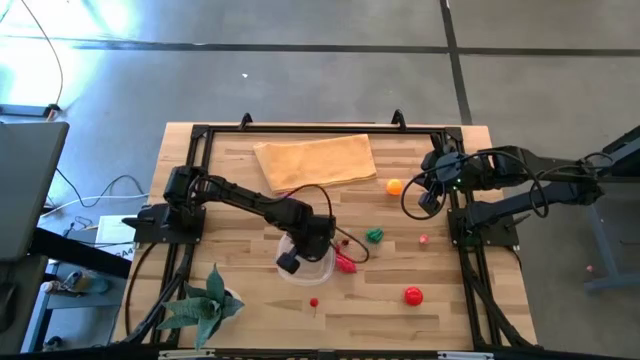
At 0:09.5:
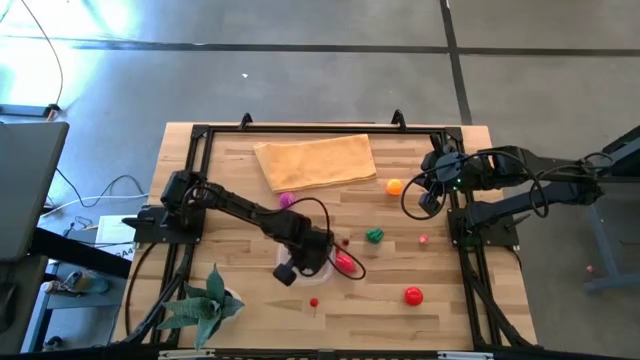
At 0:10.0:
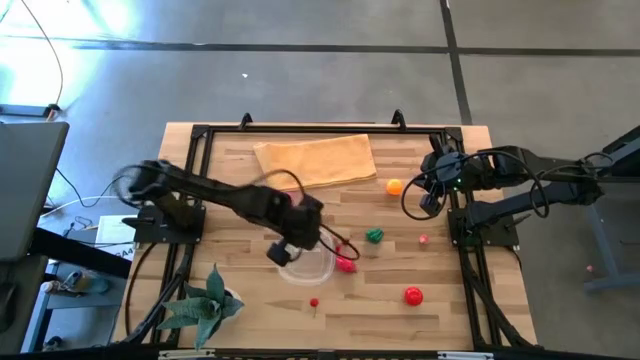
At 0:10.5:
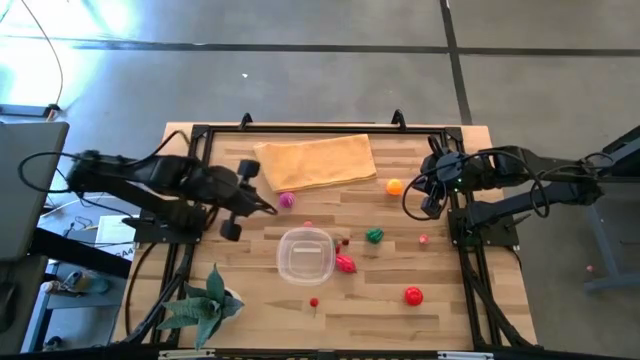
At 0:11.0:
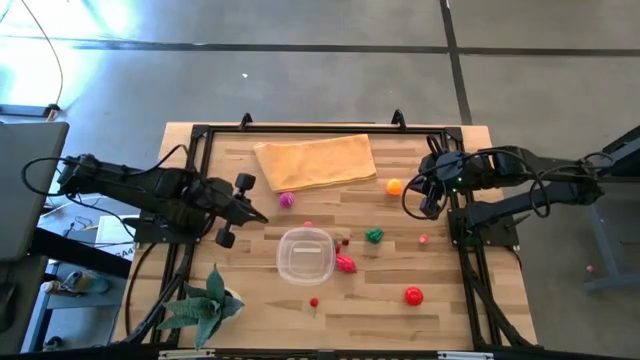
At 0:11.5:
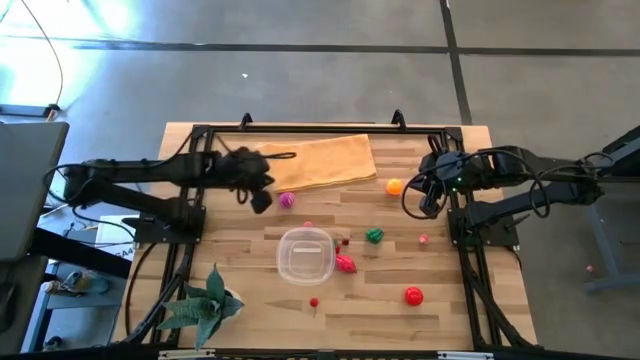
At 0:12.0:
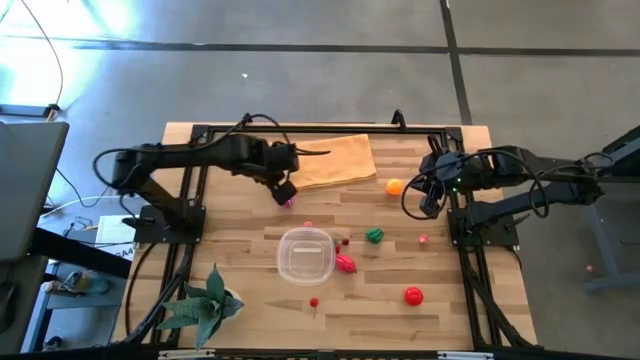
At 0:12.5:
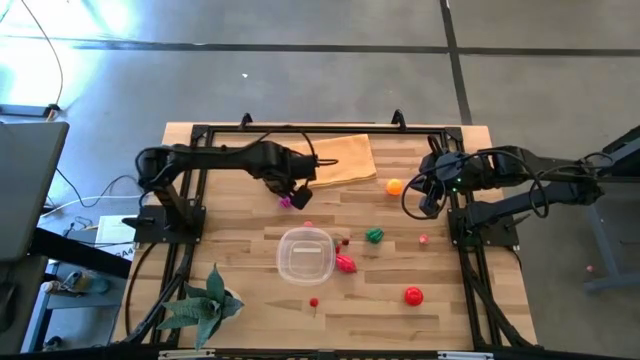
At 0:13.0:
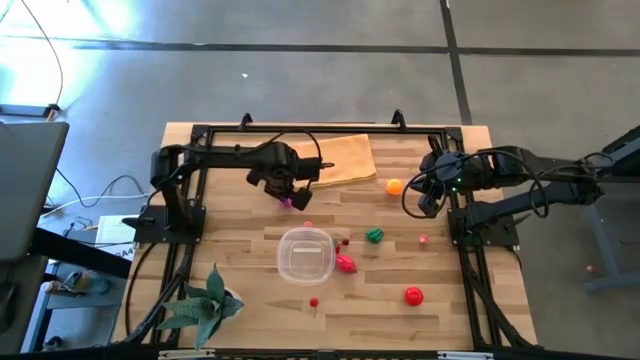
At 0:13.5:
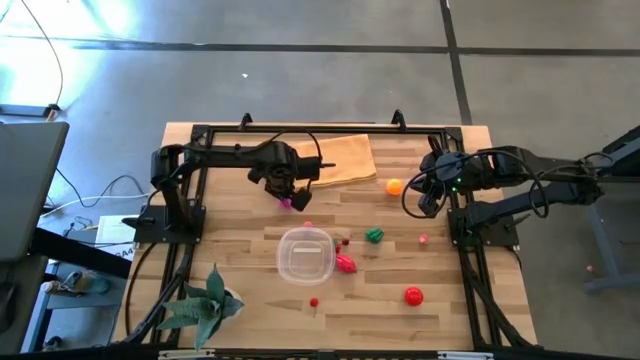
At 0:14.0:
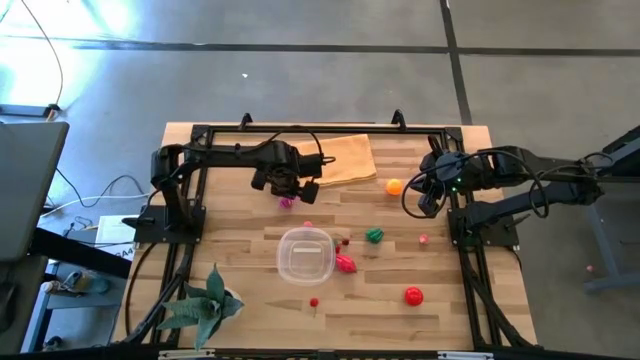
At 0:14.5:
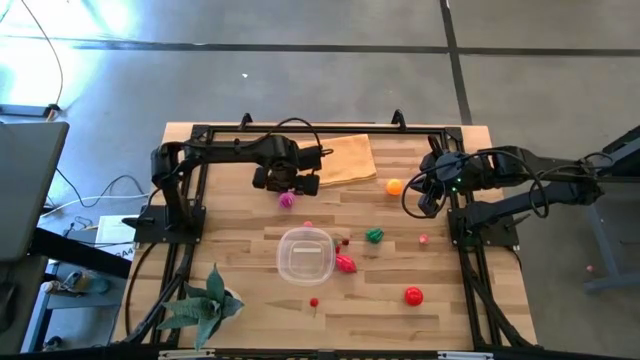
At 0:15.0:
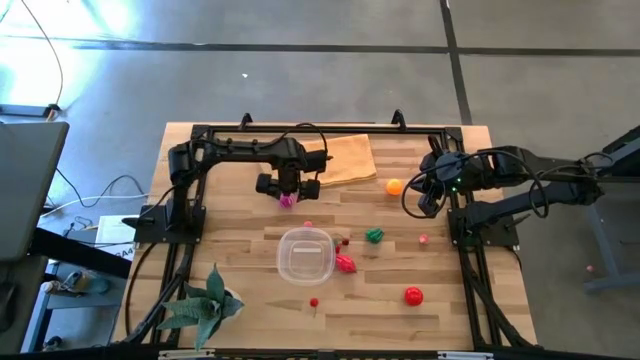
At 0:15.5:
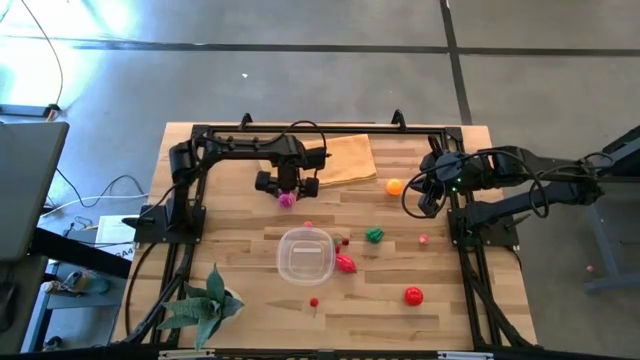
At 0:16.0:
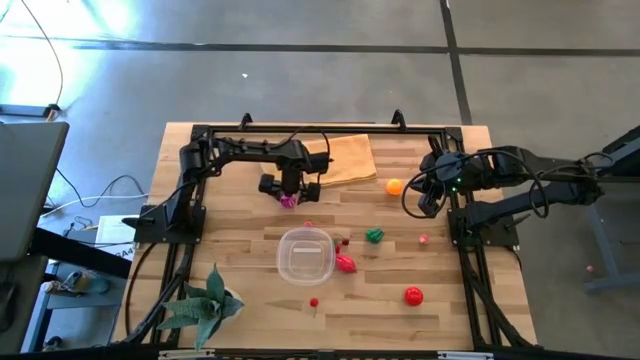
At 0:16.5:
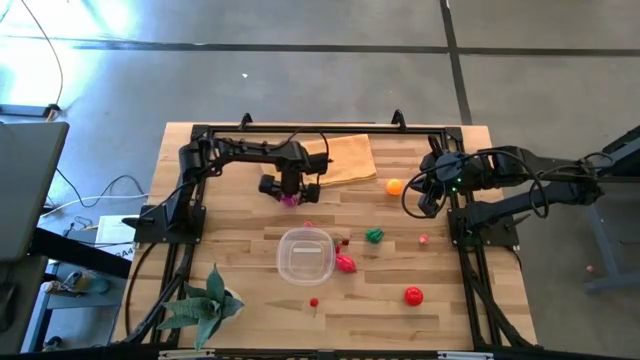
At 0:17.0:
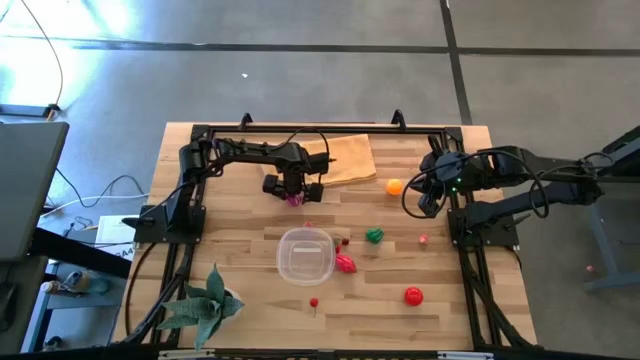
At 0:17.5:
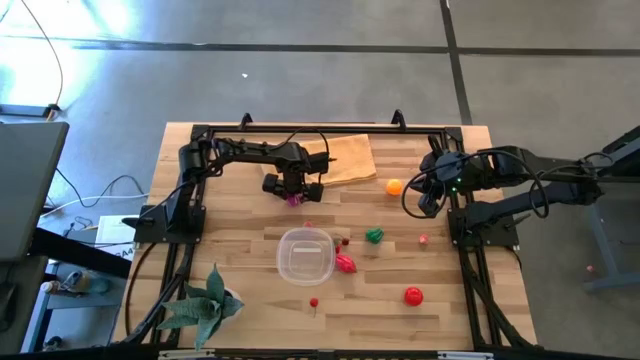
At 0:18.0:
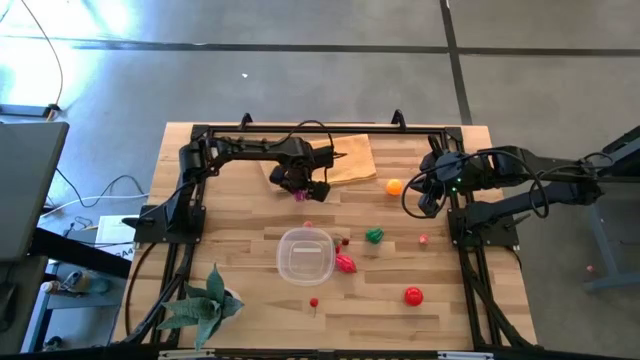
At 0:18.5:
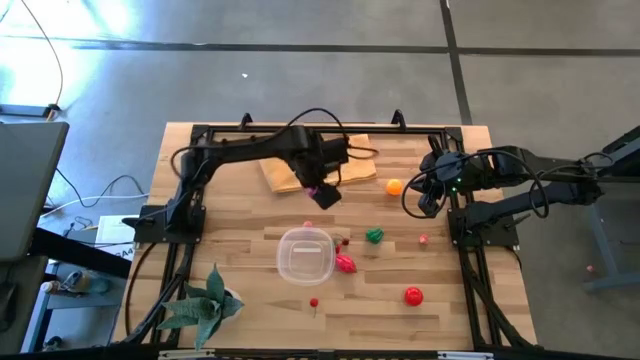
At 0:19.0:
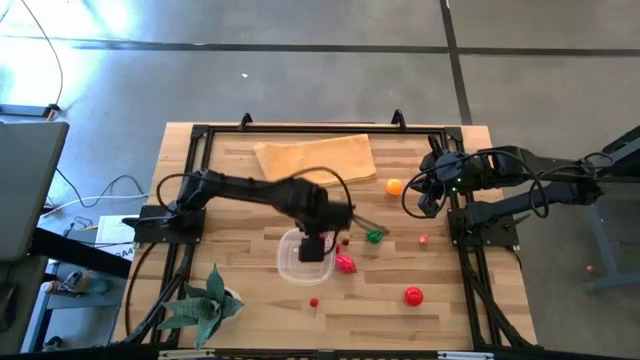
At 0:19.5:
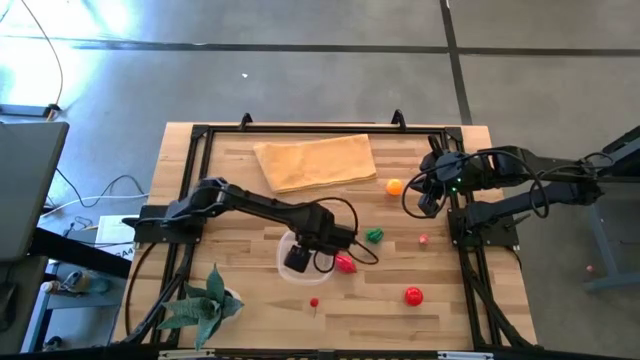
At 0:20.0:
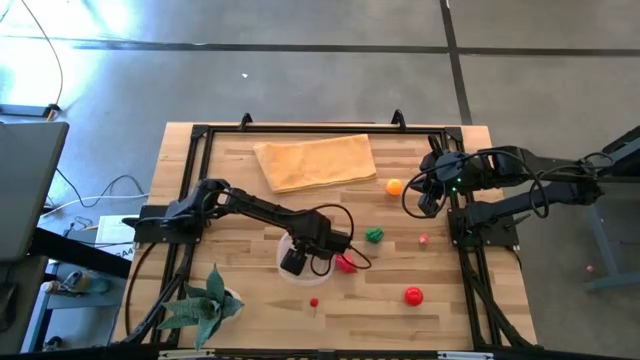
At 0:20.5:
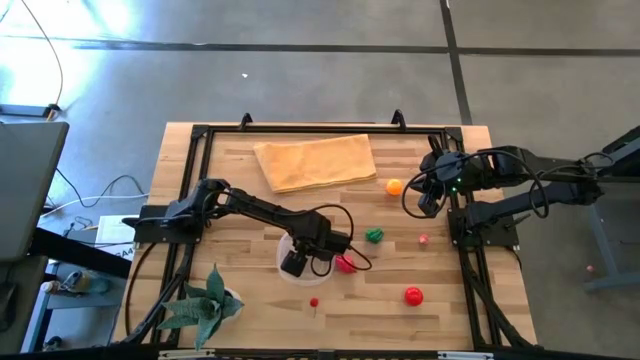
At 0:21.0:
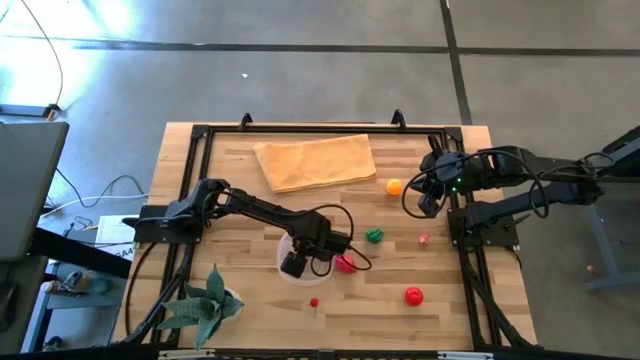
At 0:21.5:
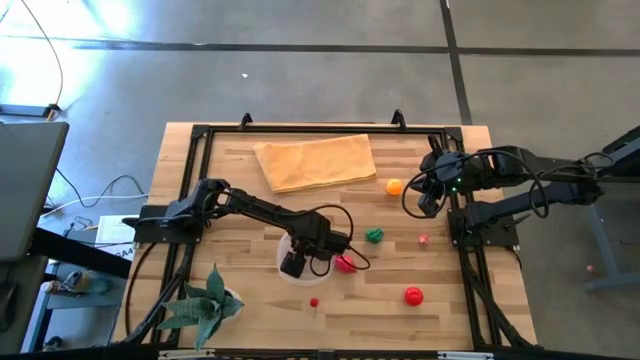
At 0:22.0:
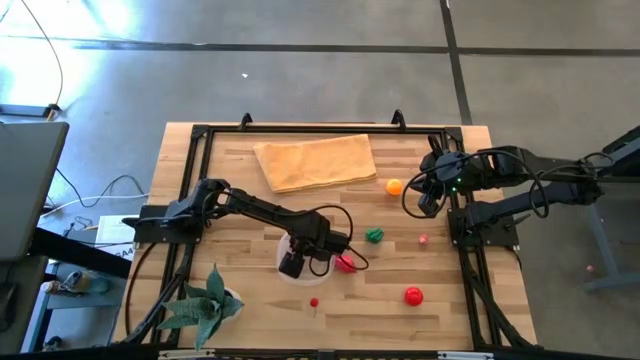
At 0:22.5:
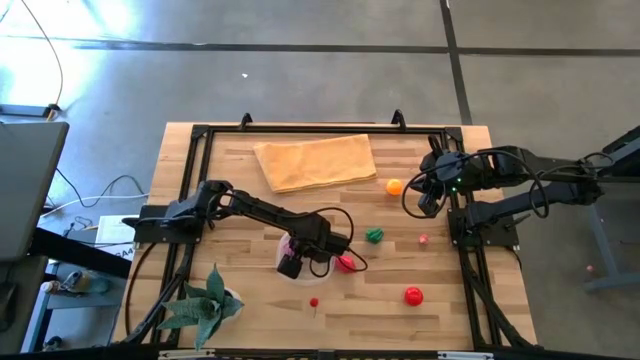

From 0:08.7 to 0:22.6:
Task: Pick and placing Produce into tupperware
Put the red onion into the transparent bin
